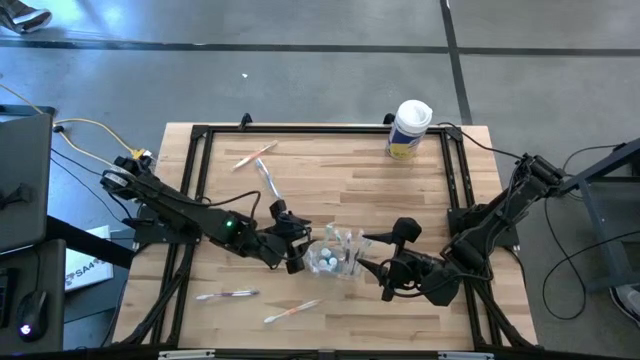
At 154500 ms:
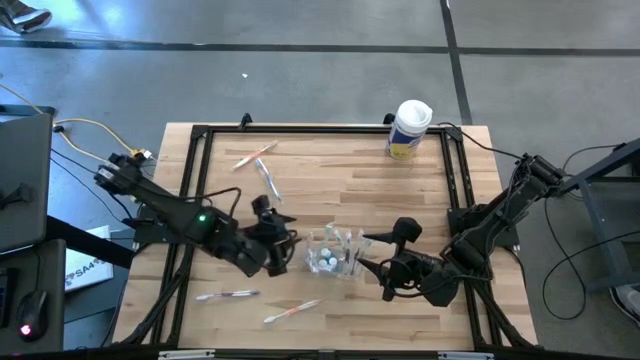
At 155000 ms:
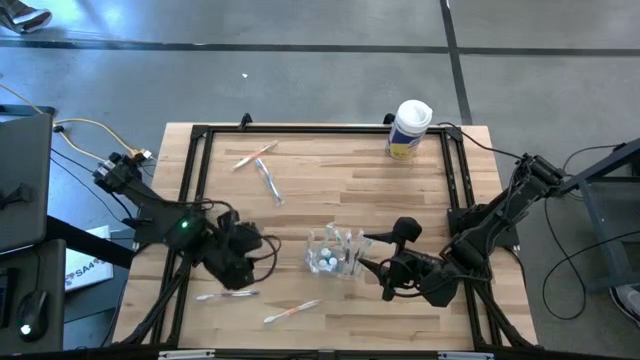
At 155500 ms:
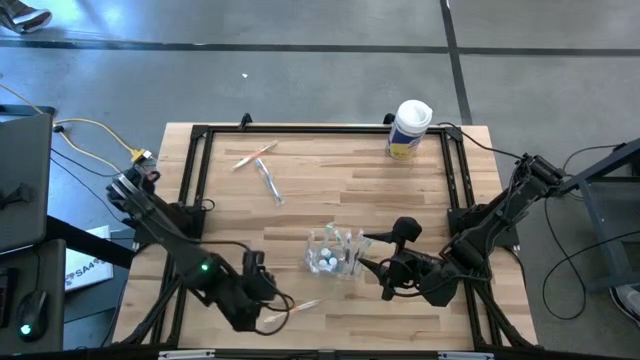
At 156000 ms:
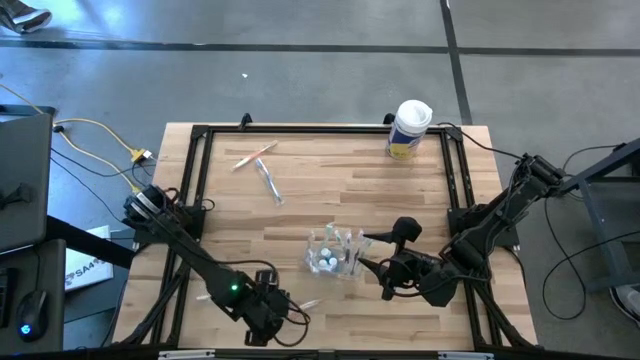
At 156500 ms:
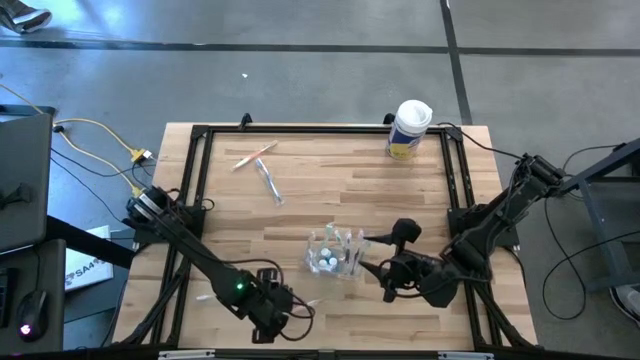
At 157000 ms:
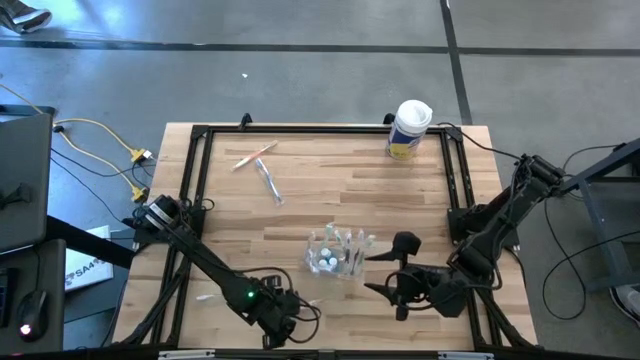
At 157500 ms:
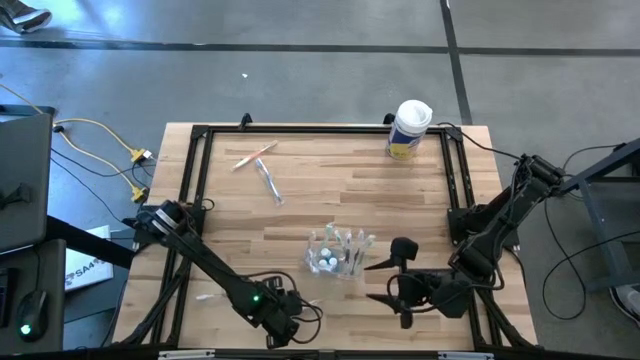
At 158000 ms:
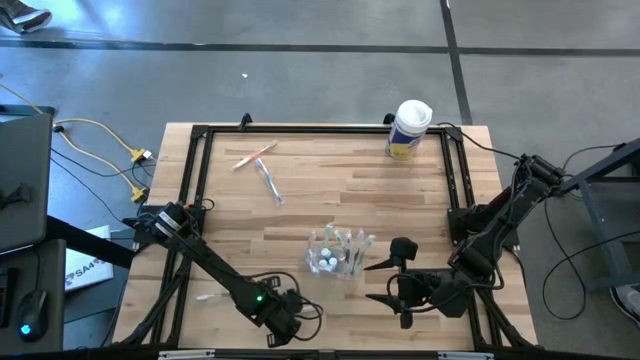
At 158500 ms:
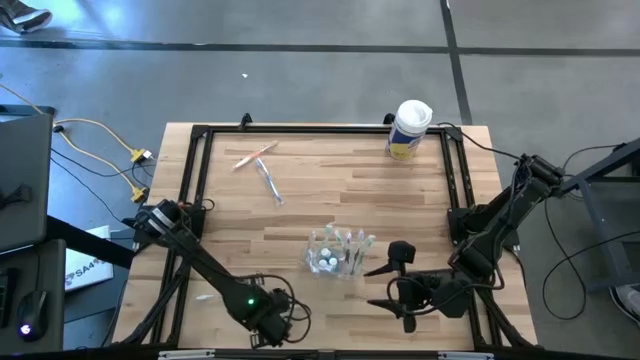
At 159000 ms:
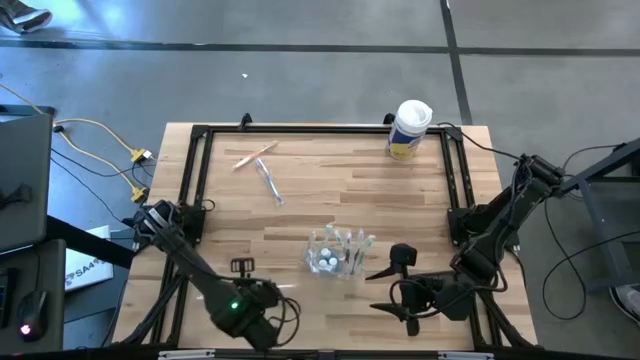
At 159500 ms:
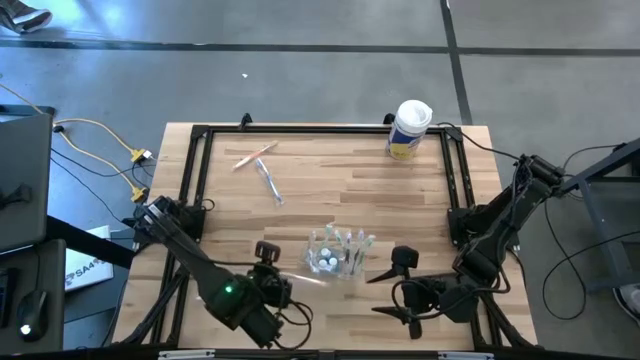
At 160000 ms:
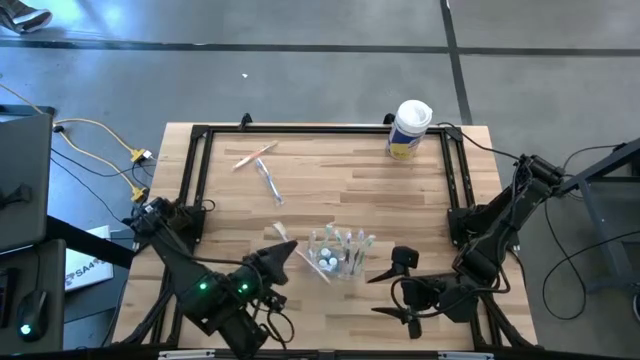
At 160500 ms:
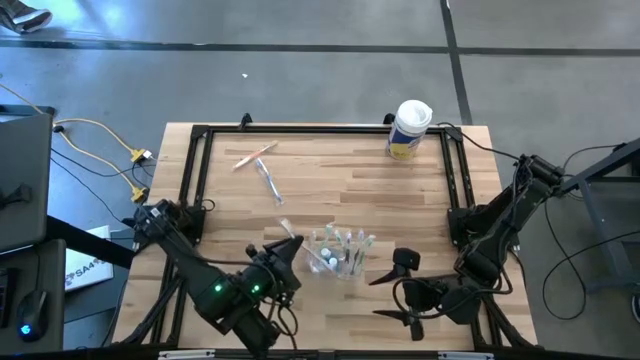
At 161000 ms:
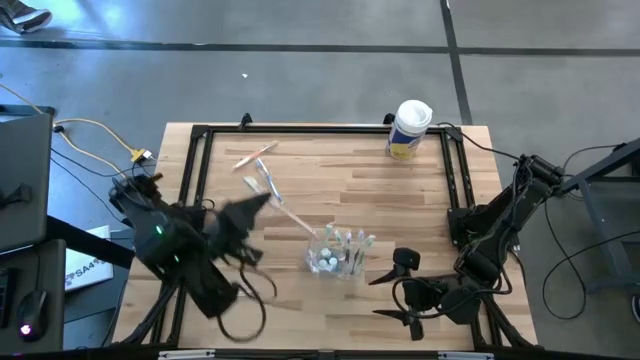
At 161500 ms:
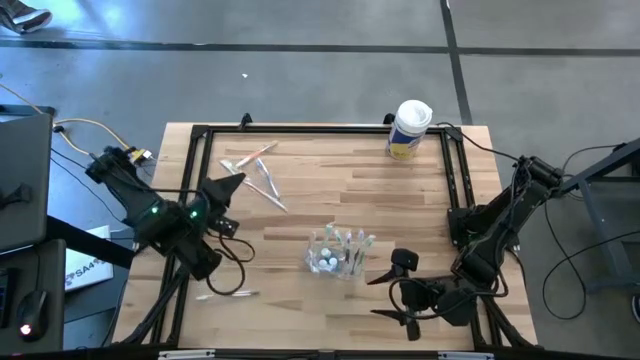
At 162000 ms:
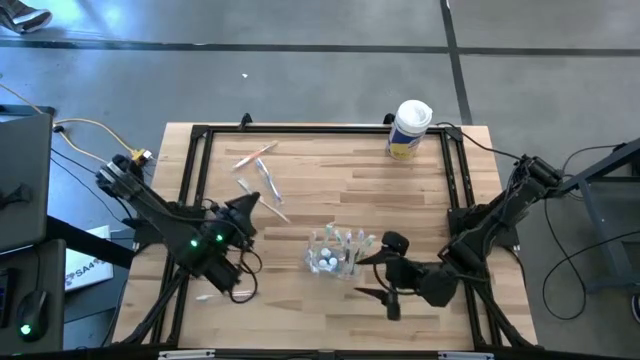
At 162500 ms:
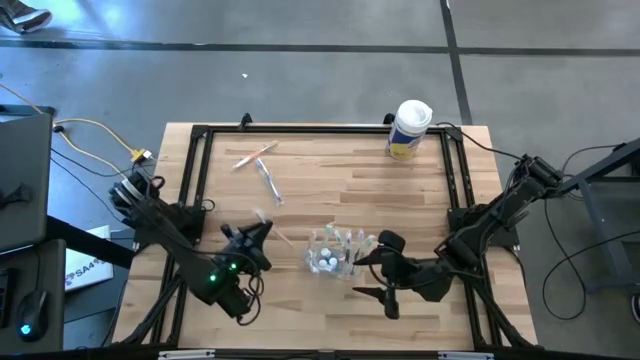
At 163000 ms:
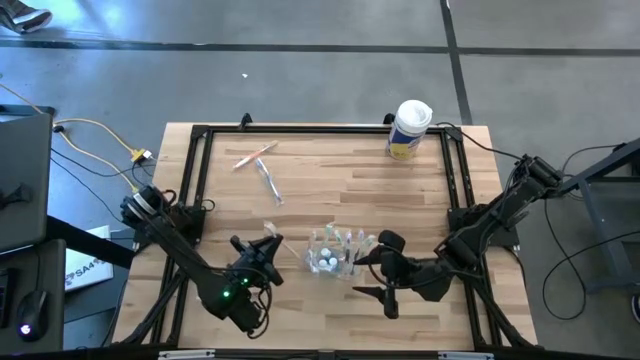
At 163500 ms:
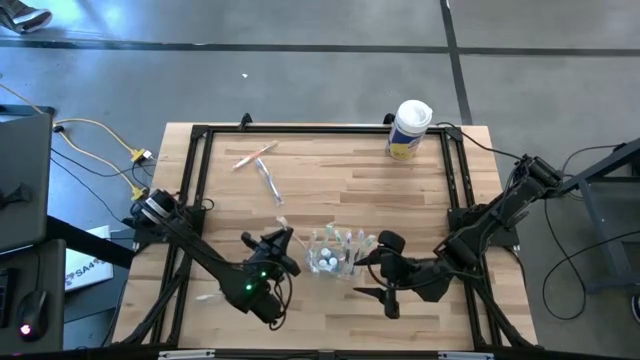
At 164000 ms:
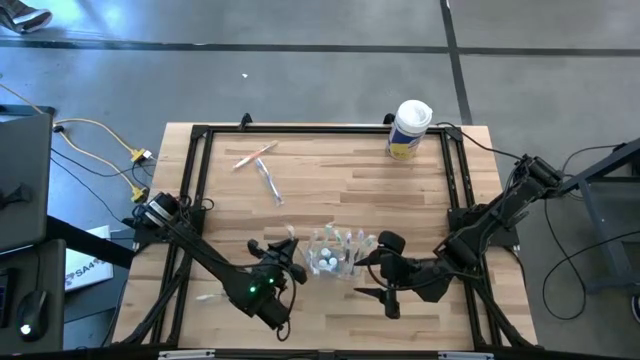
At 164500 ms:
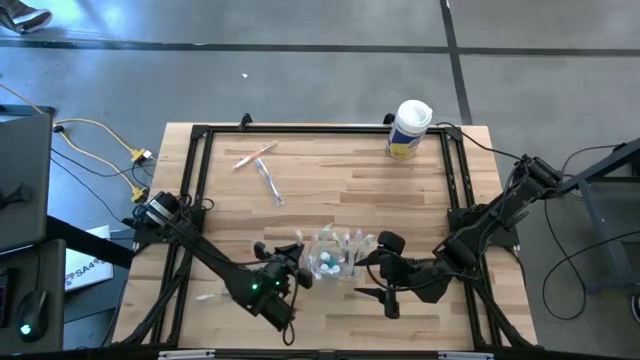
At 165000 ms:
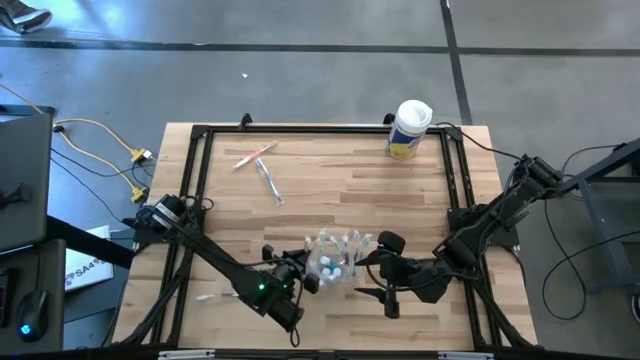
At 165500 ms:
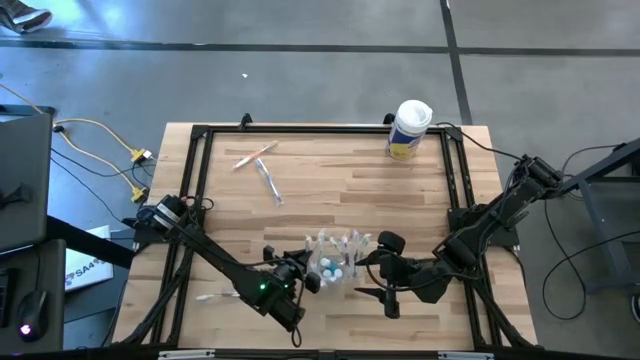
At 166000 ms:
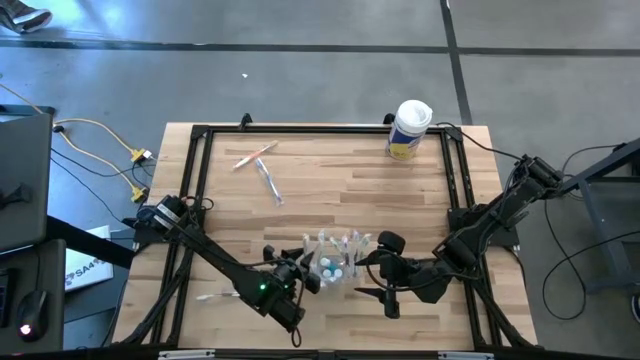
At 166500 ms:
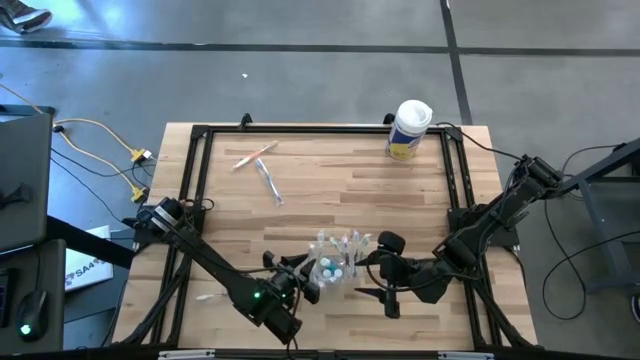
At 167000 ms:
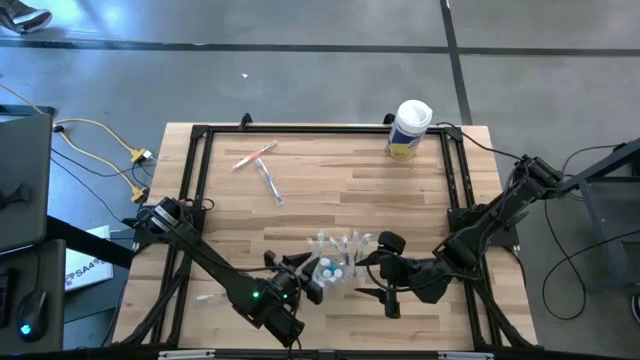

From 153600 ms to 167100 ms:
Task: Pick & Place toothbrushing station
Put the bottom orange toothbrush into the transparent organizer
